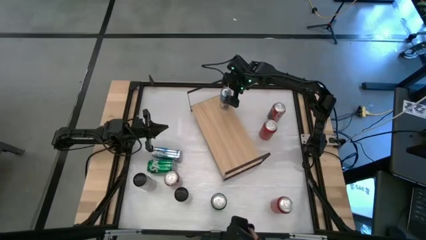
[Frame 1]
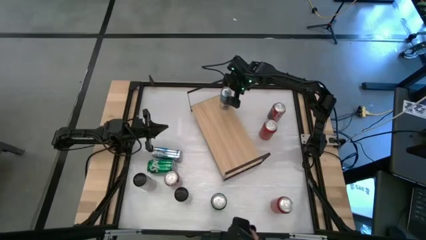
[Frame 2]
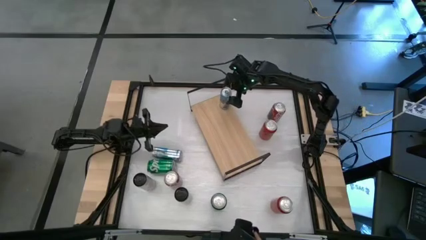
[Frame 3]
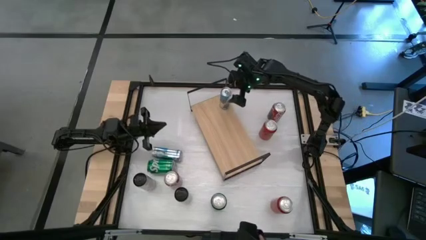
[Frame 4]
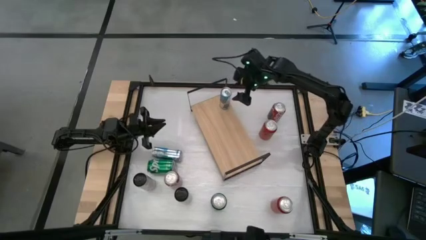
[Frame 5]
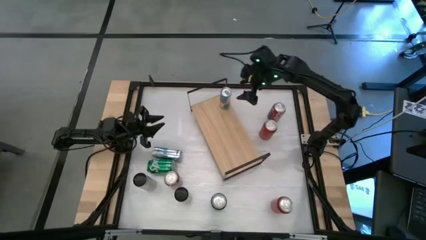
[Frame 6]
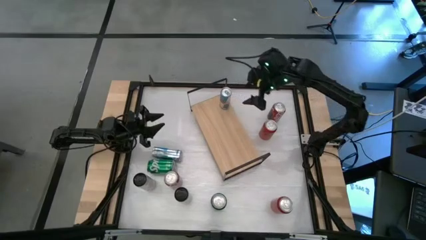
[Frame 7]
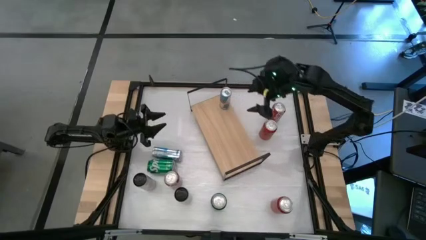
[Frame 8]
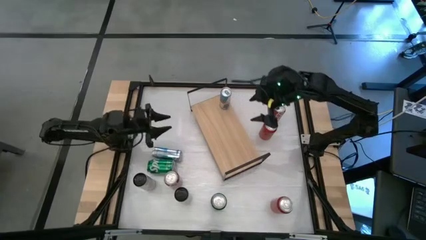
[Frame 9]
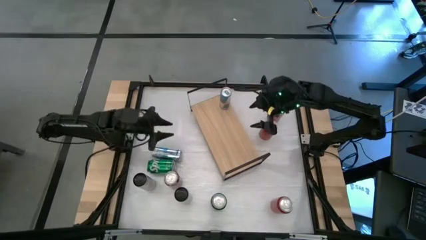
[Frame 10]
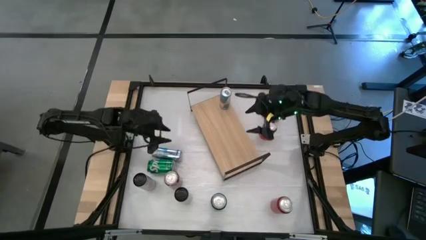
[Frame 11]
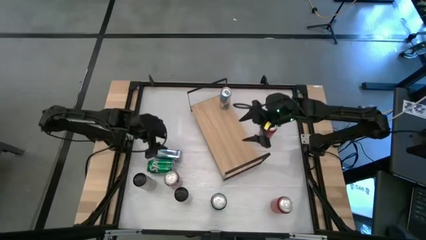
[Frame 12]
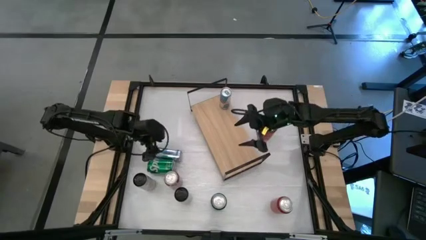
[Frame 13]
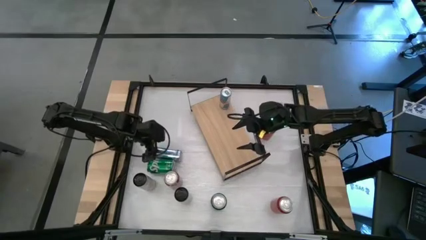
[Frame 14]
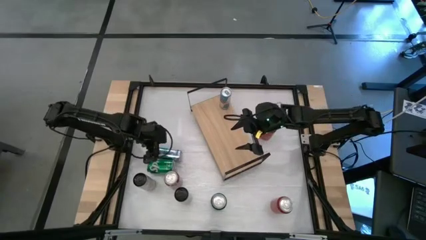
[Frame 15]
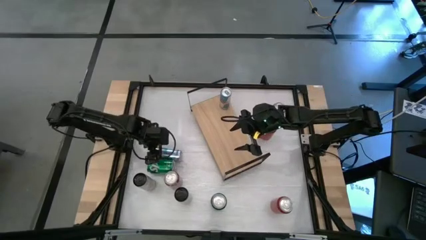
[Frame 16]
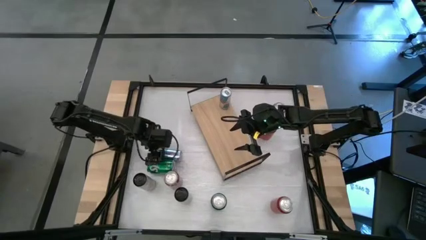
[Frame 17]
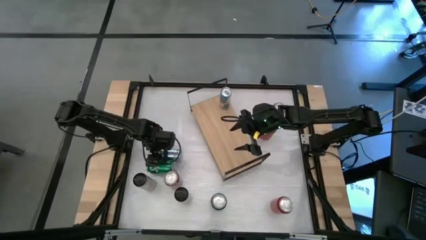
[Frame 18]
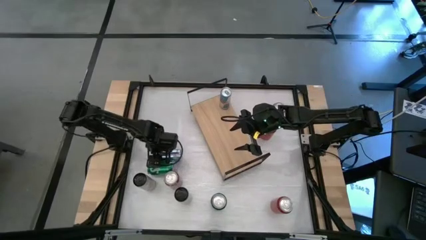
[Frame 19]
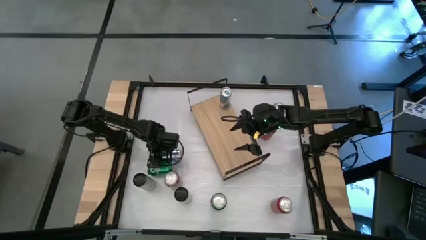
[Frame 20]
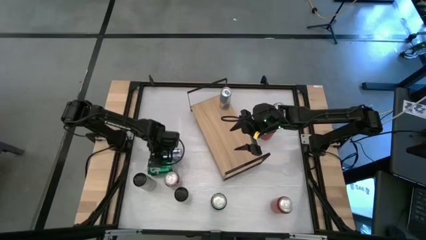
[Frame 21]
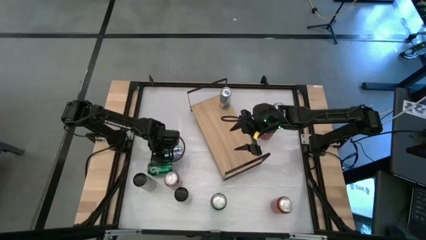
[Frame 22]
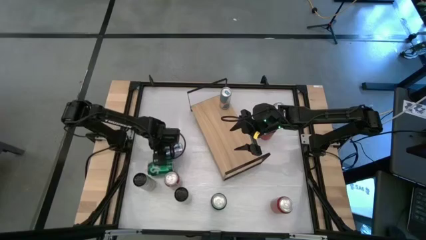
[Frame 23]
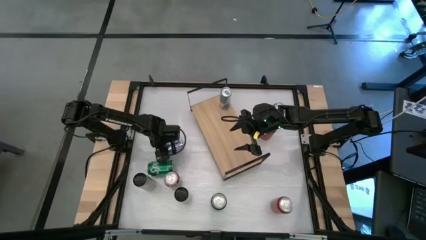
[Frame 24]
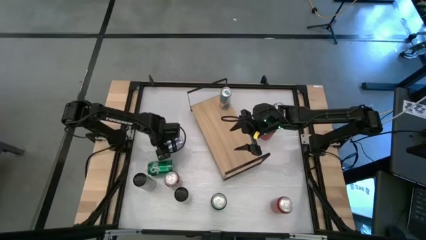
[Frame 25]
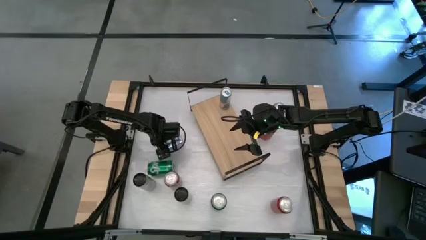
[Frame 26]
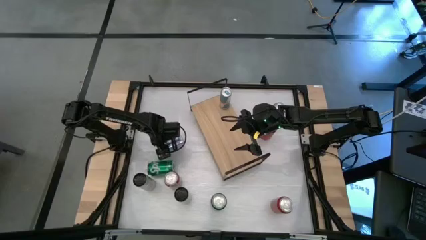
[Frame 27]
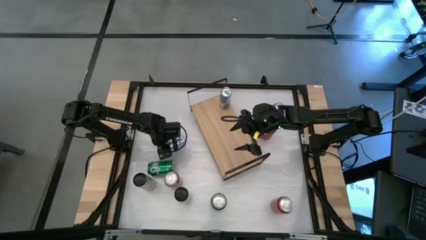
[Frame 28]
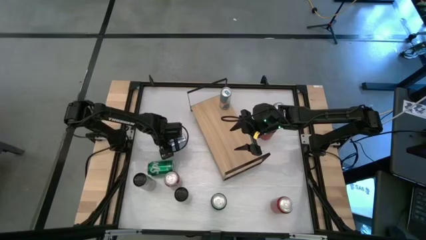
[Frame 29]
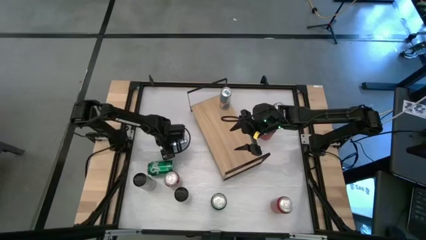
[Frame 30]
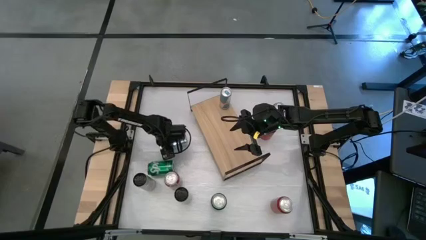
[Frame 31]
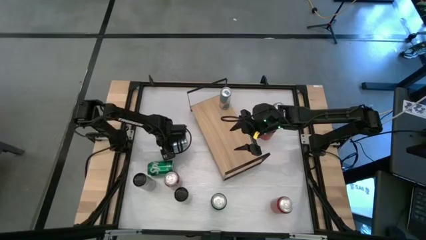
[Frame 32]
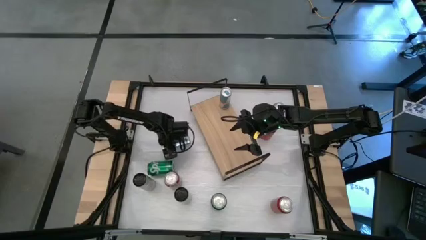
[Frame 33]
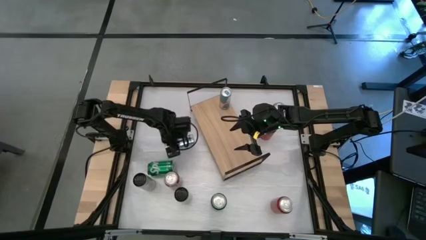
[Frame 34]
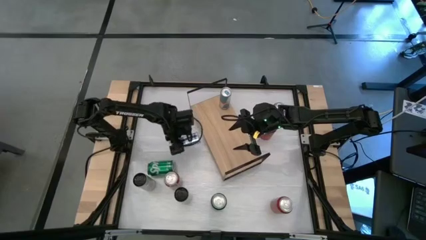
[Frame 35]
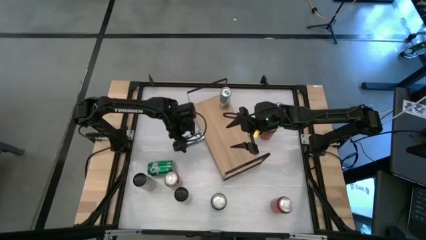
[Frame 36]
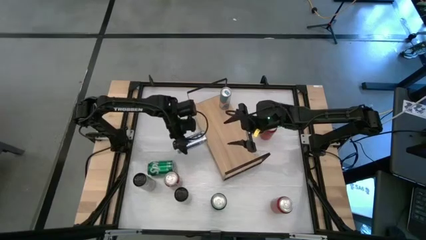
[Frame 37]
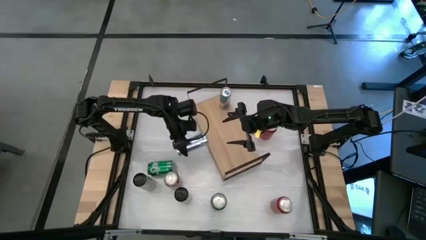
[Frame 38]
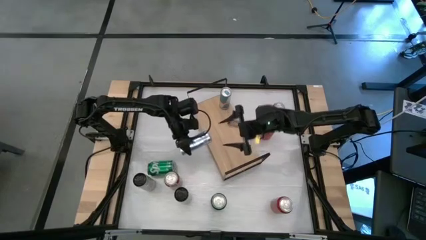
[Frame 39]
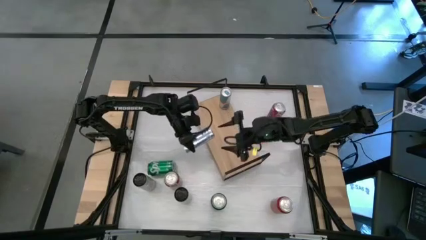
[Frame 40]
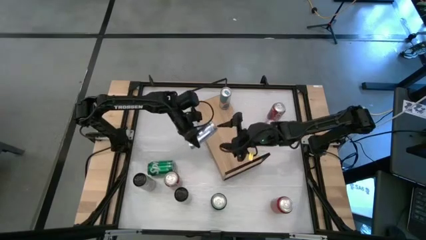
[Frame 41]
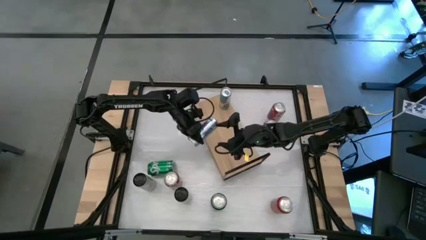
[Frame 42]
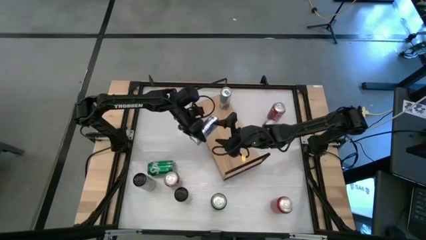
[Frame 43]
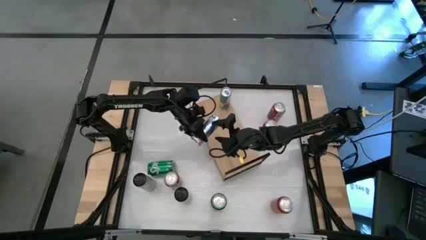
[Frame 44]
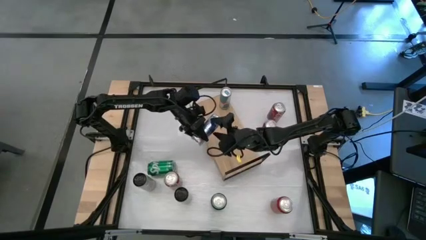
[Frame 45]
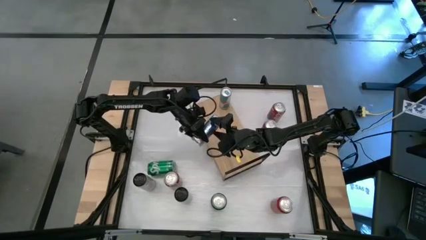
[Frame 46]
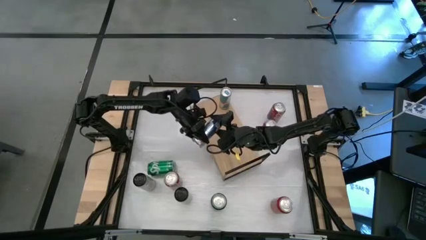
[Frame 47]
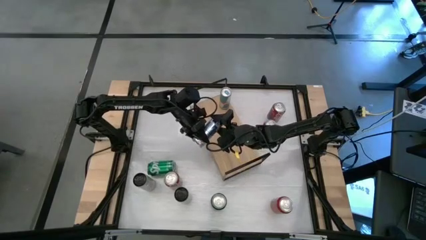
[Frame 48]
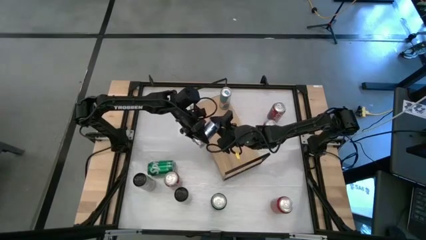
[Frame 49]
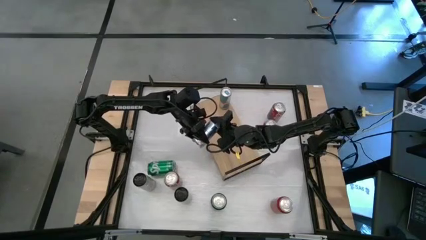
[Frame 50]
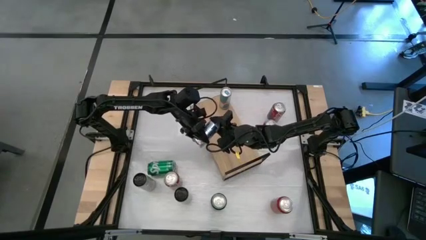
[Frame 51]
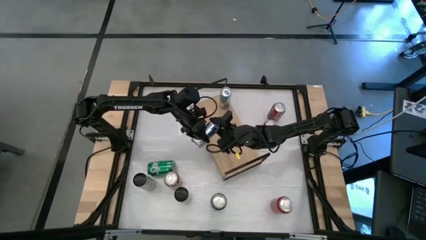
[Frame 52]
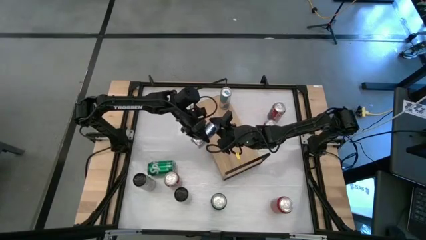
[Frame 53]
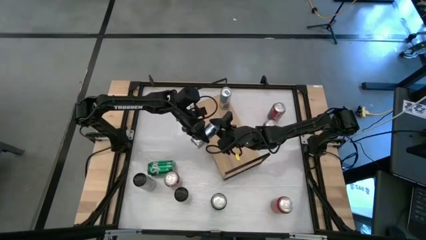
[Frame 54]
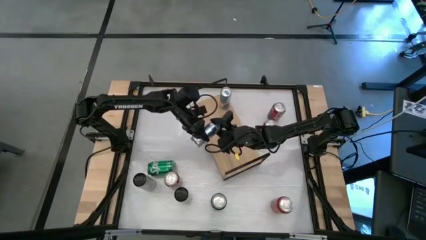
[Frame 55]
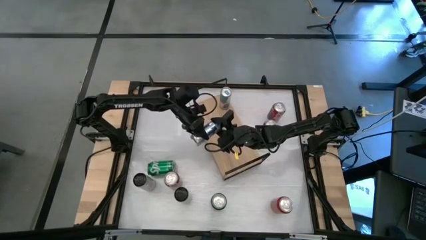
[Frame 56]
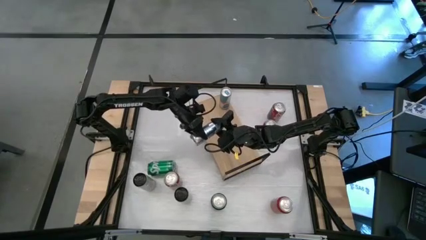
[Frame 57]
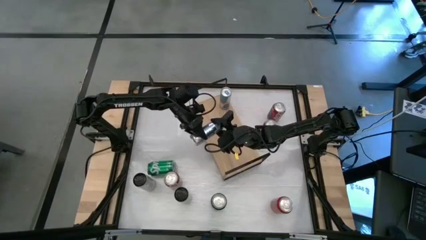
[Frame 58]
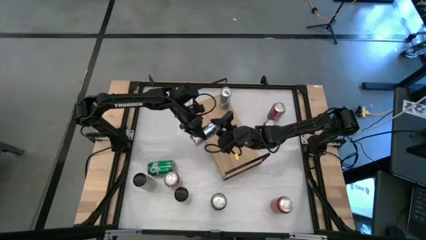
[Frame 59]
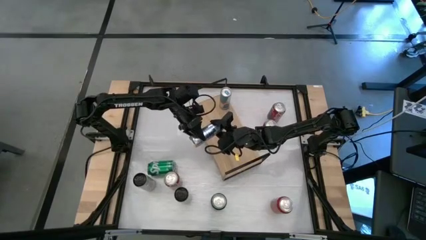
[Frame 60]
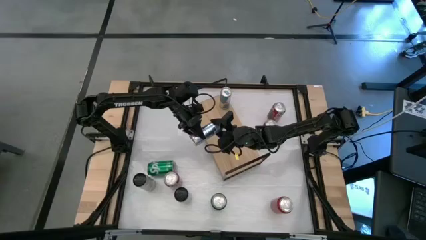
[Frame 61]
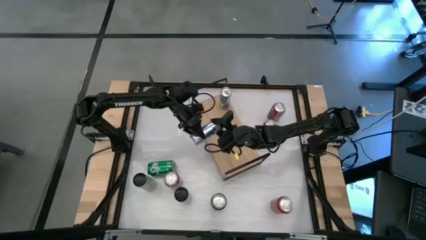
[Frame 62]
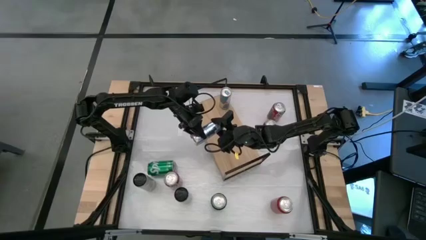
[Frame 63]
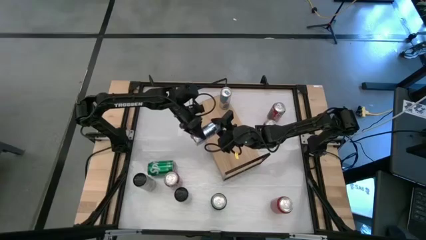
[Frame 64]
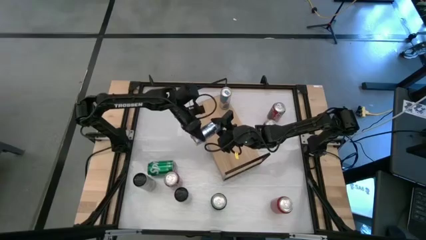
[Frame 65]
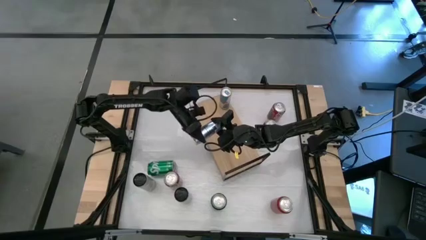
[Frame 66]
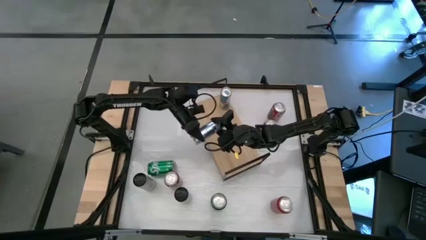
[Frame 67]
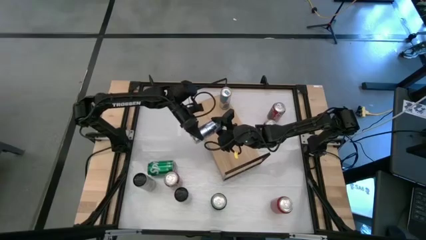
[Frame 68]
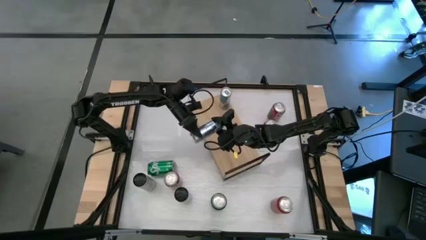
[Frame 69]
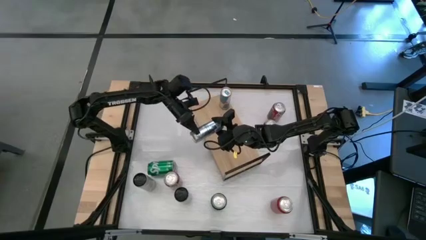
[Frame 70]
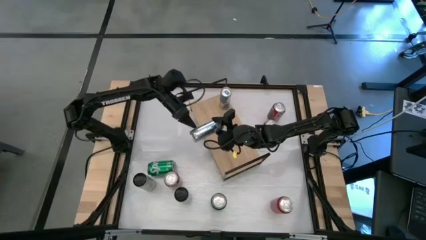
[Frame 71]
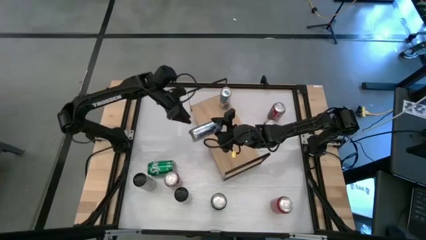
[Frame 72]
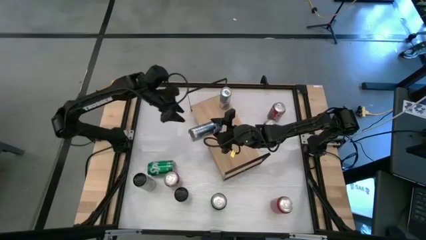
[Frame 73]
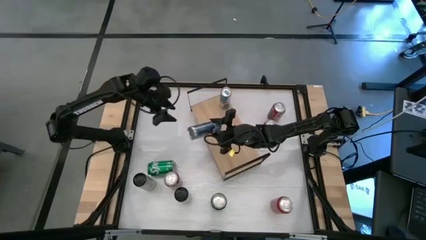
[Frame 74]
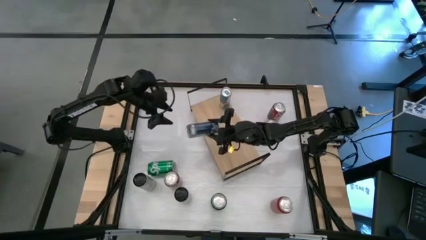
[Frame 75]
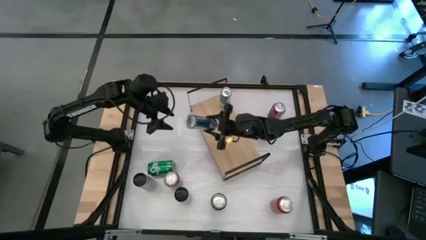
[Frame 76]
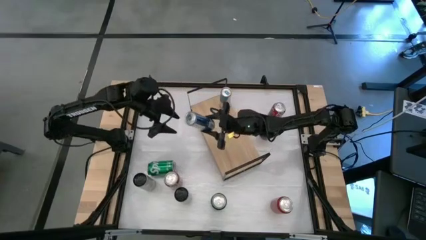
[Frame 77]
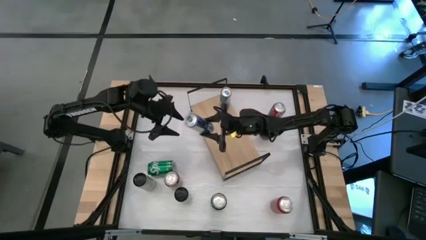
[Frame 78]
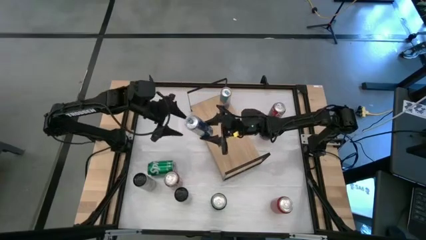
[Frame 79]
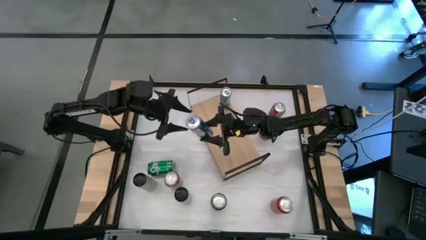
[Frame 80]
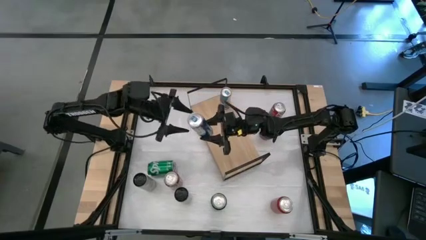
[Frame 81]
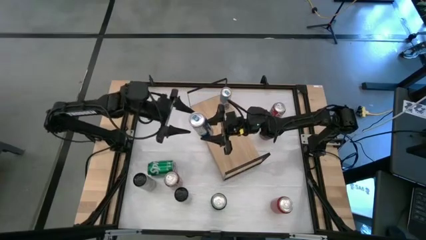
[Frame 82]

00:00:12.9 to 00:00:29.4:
Task: Place canned beverage on shelf
Put the blue soda can on the shelf aligned with the other blue soda can
